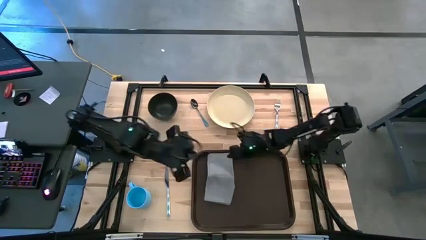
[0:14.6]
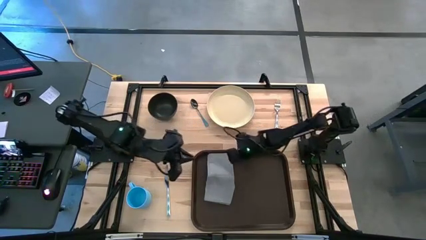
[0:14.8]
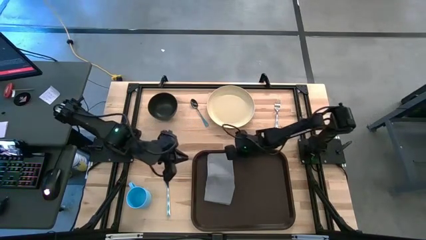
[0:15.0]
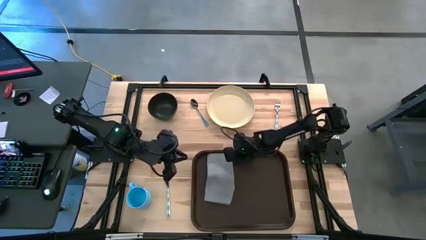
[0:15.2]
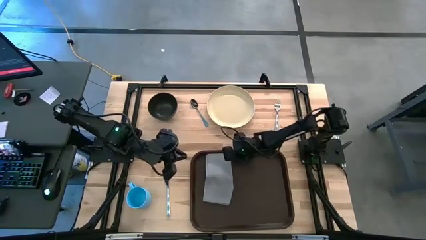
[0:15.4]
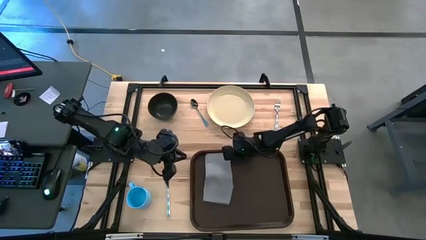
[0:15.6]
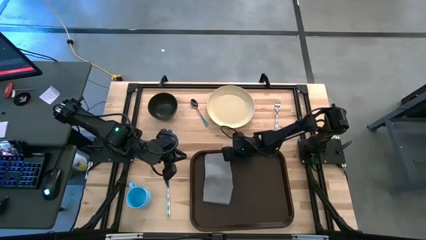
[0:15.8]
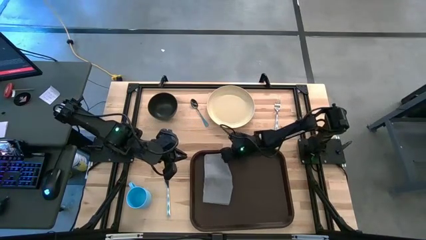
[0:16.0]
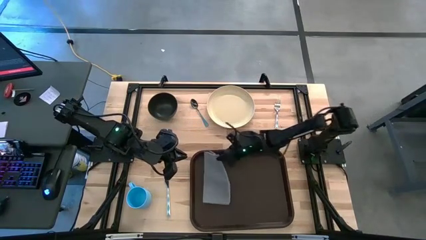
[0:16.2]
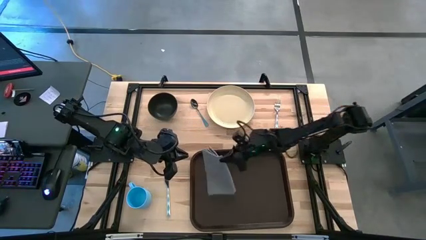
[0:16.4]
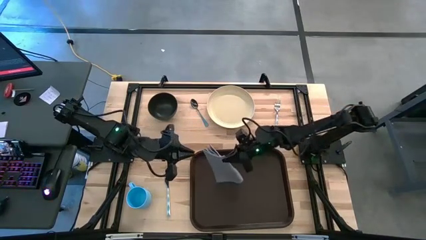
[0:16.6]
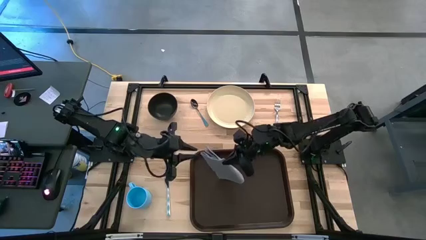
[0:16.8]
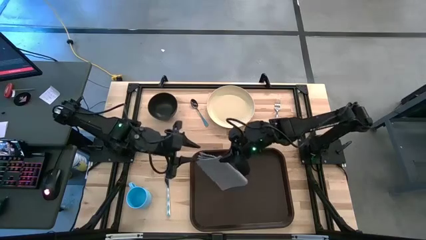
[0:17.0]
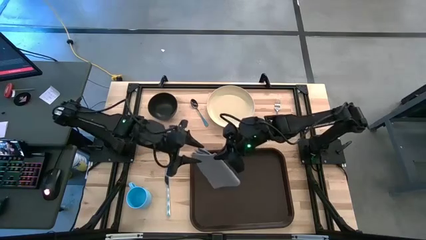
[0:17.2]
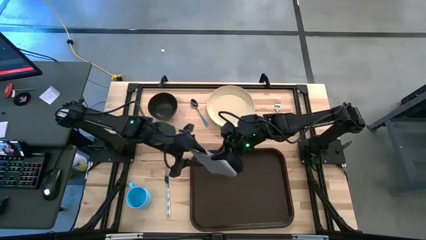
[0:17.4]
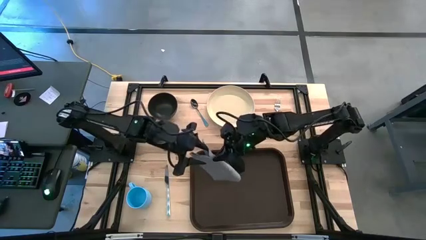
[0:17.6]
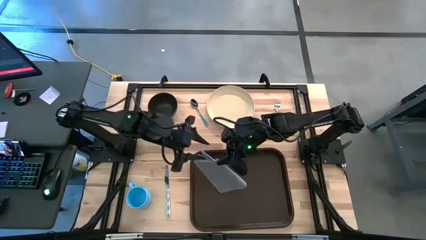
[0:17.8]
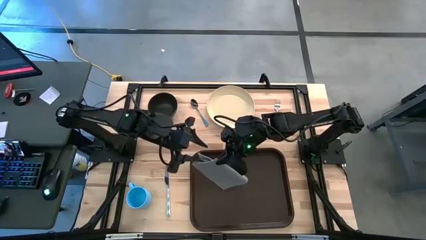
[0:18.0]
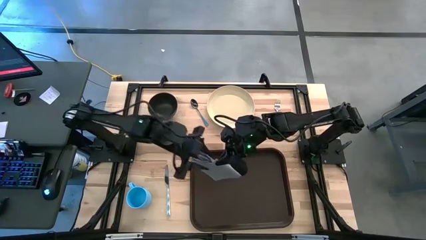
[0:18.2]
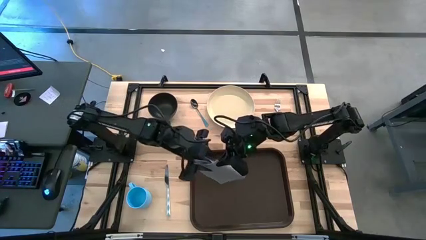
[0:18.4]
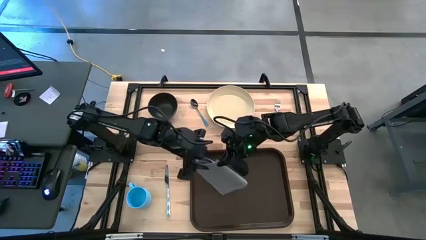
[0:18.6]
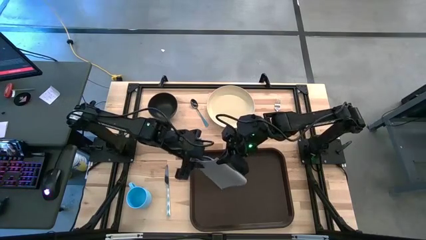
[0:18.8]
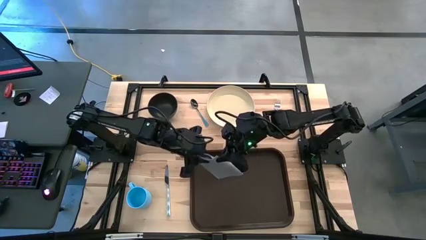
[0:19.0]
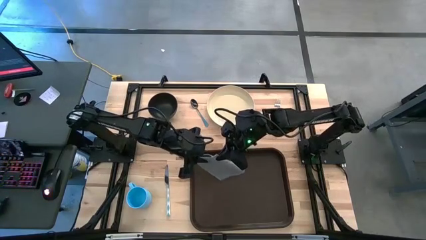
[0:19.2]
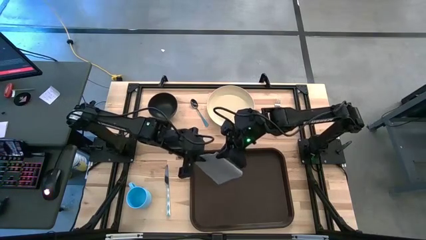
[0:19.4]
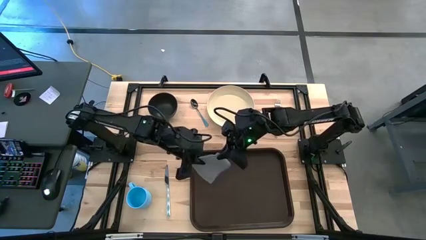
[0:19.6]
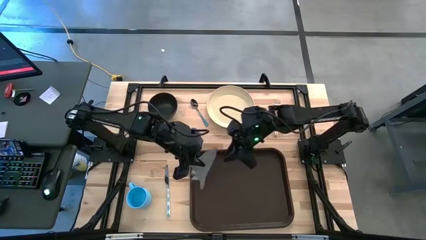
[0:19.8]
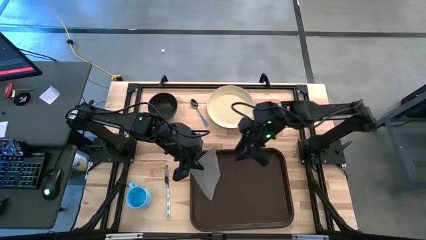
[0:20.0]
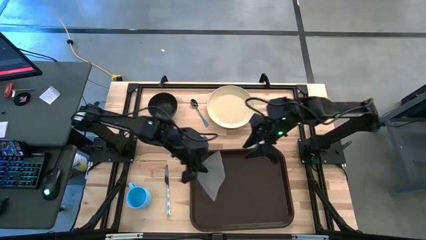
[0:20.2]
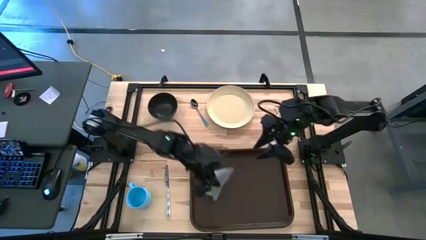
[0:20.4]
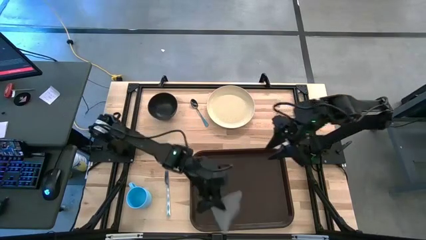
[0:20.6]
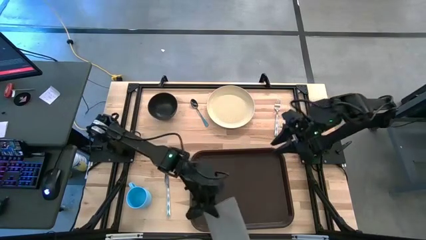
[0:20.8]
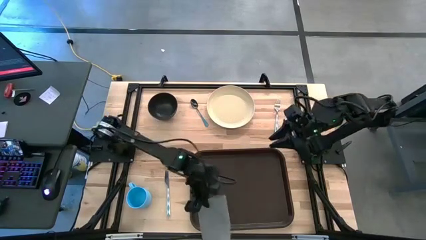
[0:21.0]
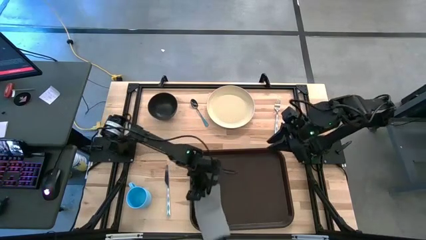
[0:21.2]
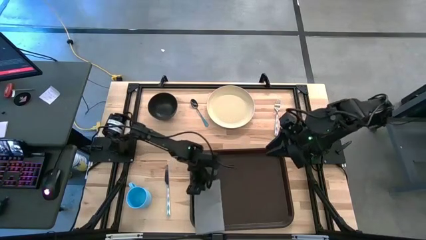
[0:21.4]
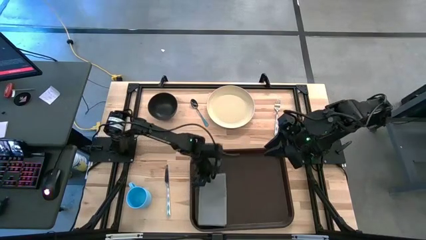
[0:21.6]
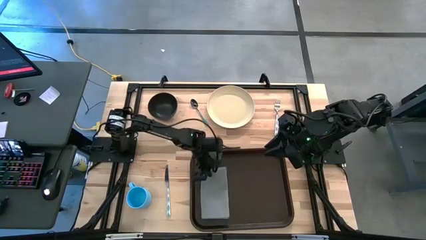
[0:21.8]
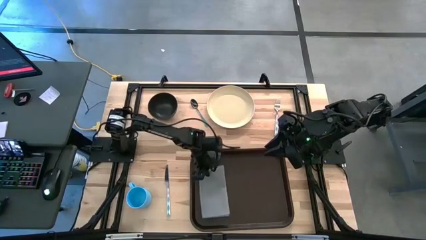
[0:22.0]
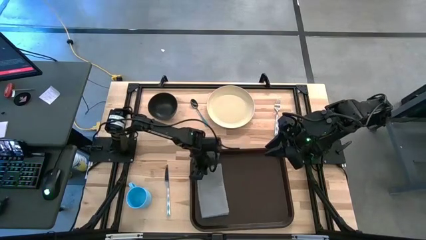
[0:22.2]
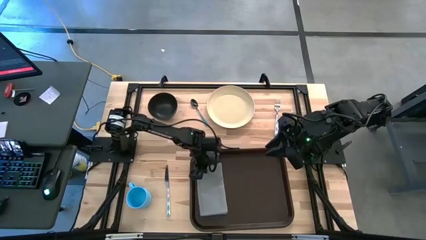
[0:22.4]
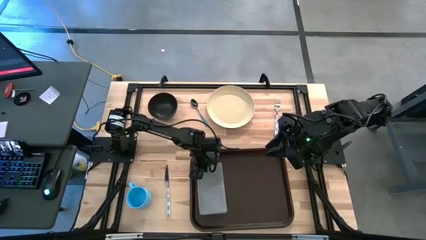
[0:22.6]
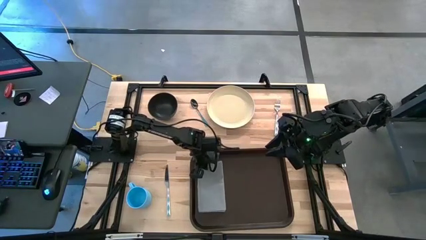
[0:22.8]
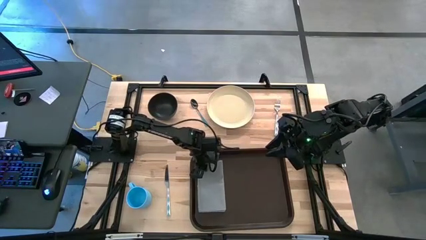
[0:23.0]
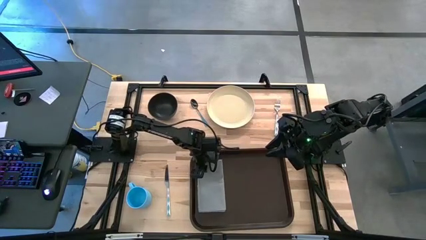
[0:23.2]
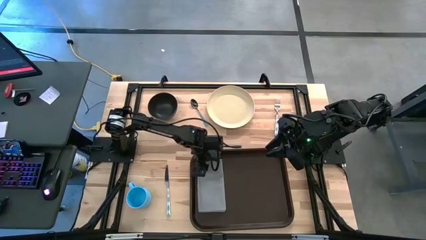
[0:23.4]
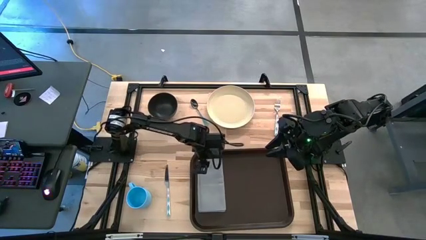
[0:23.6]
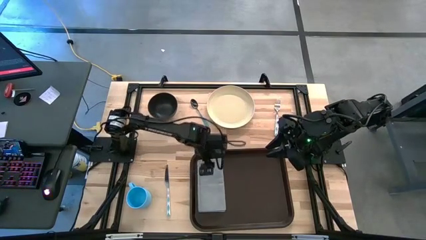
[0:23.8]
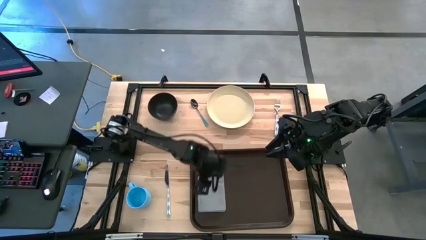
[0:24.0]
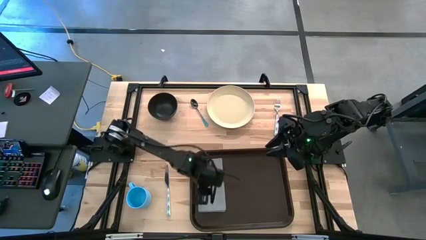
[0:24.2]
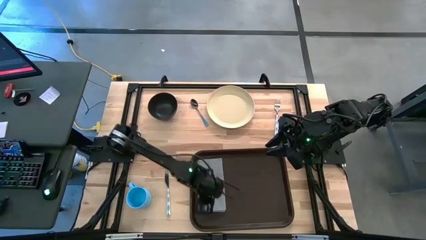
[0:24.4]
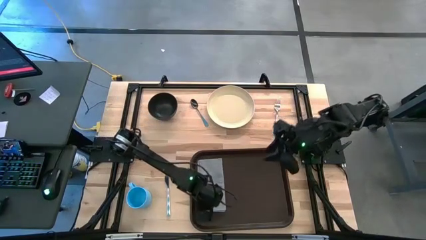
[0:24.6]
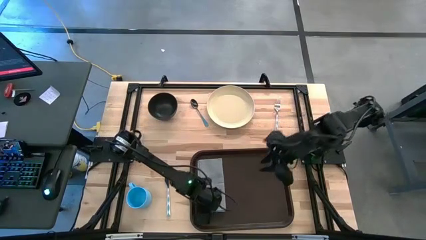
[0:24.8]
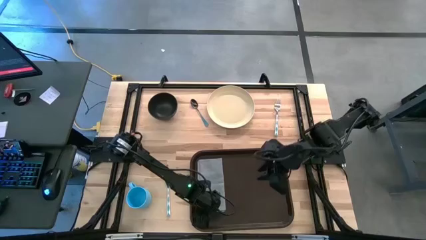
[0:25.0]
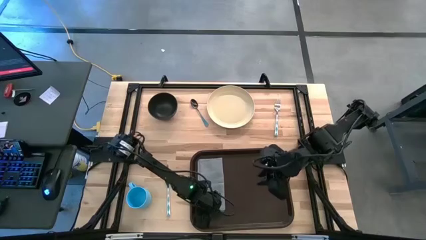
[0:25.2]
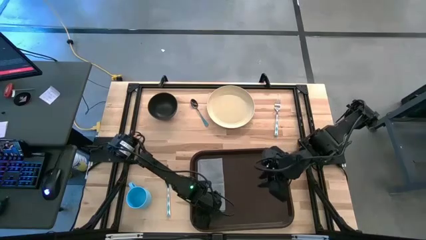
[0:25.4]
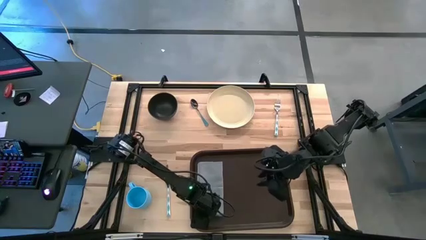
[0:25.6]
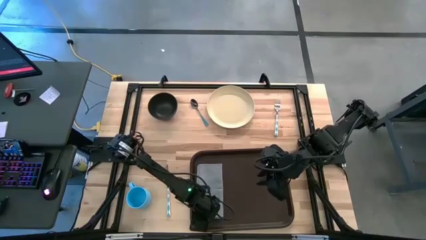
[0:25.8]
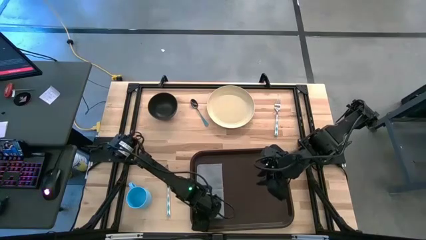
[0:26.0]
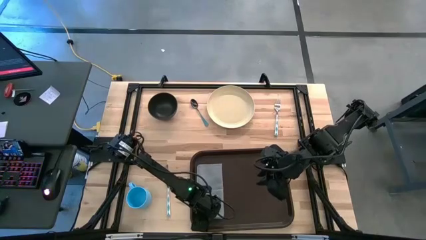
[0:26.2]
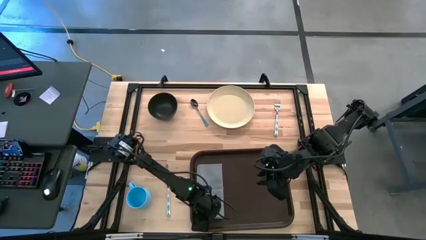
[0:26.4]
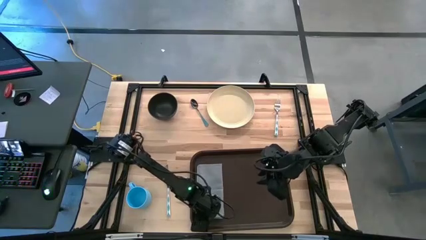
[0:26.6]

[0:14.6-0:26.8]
Task: Set up tray
Put the gray table napkin on the brown tray
